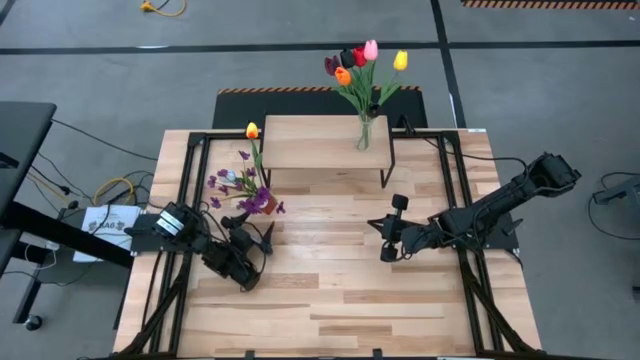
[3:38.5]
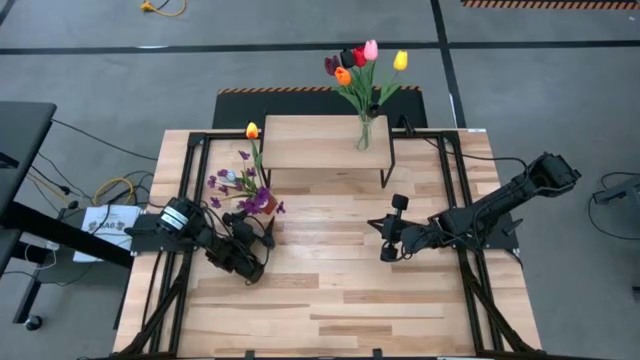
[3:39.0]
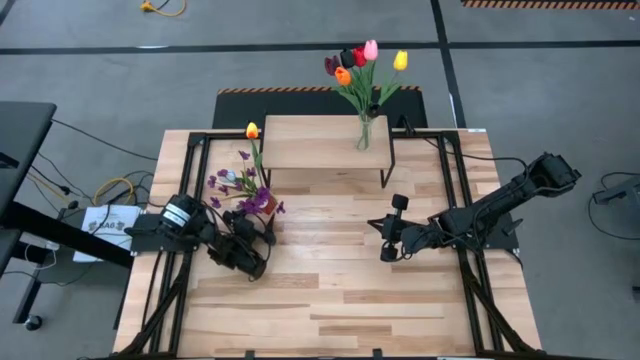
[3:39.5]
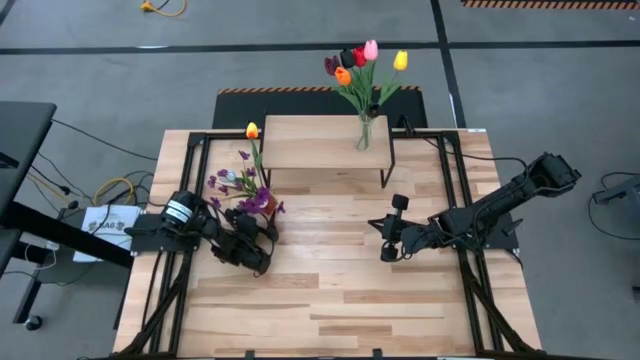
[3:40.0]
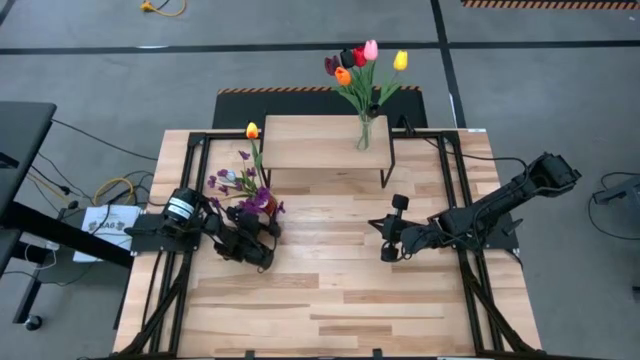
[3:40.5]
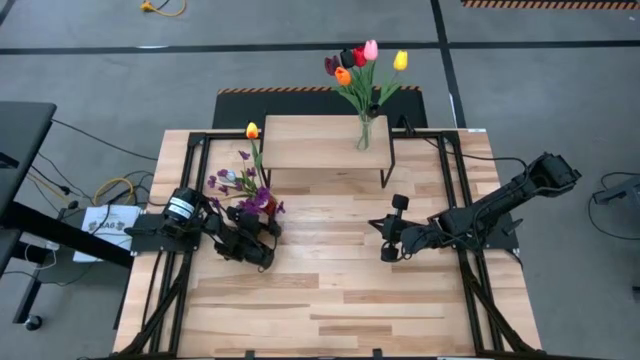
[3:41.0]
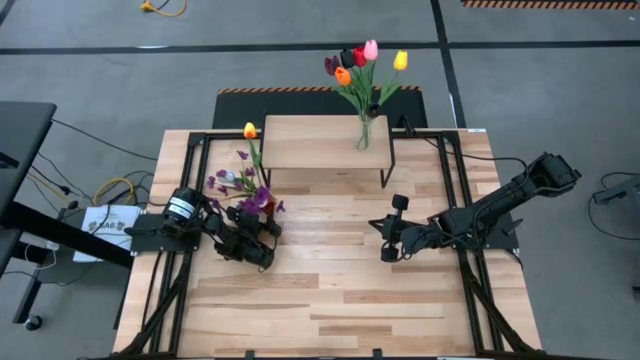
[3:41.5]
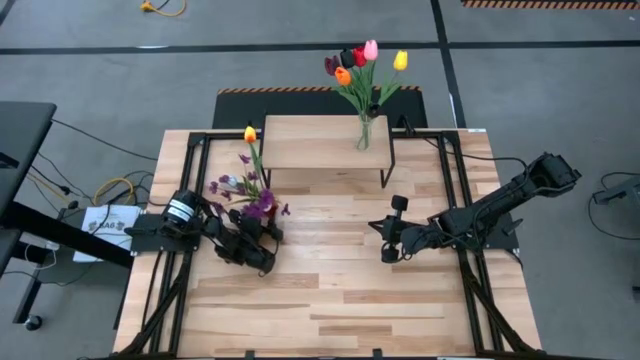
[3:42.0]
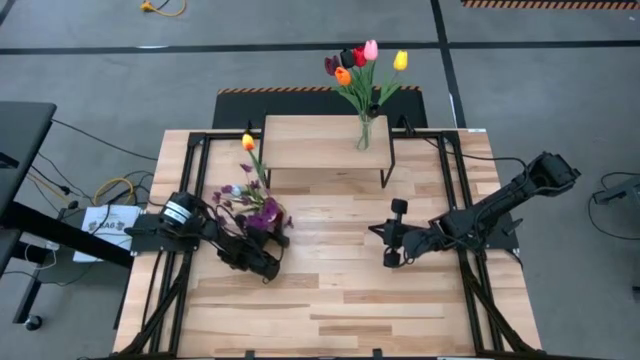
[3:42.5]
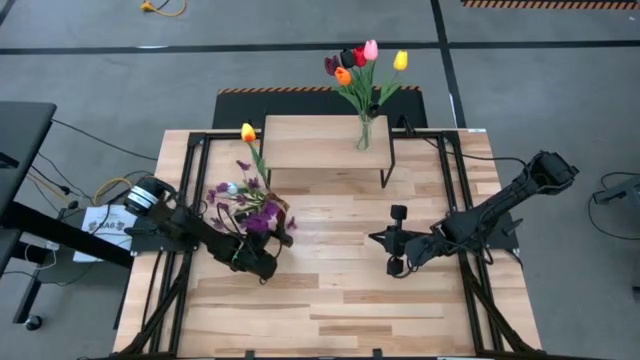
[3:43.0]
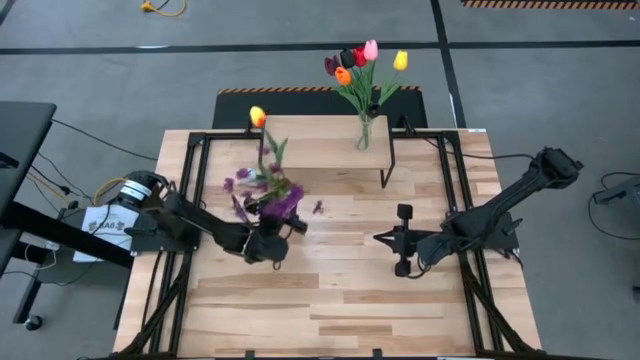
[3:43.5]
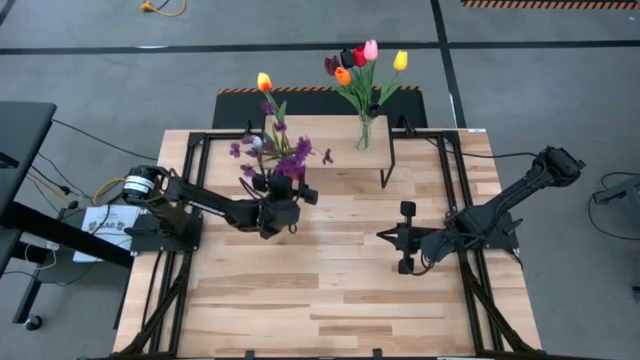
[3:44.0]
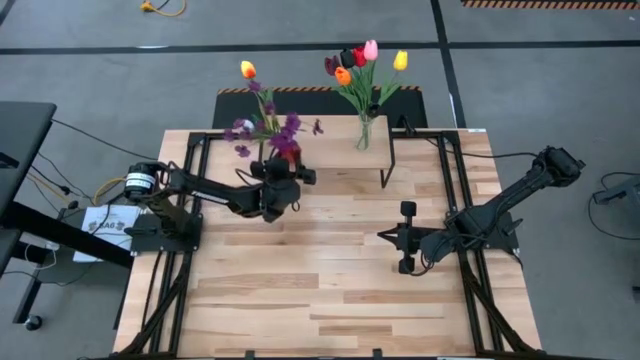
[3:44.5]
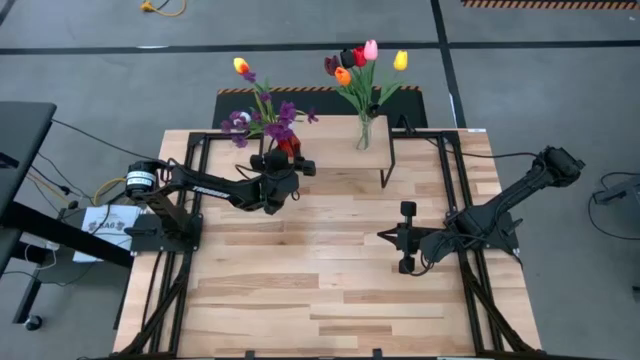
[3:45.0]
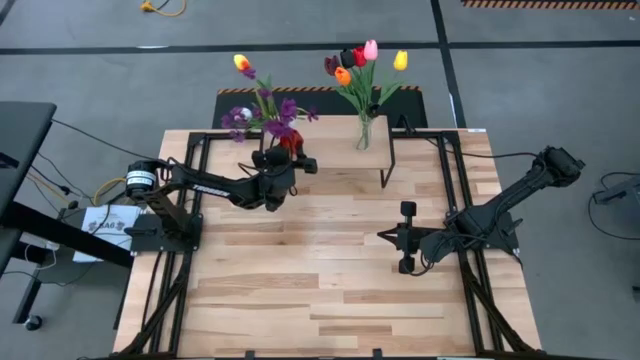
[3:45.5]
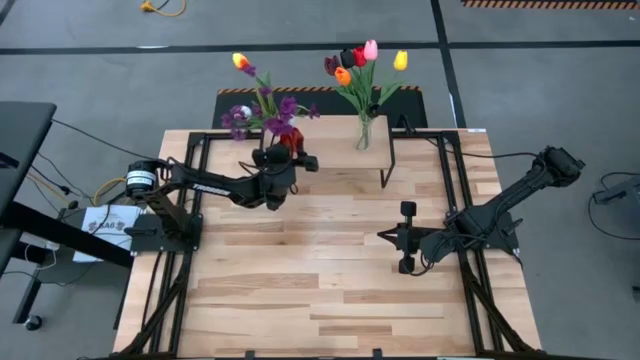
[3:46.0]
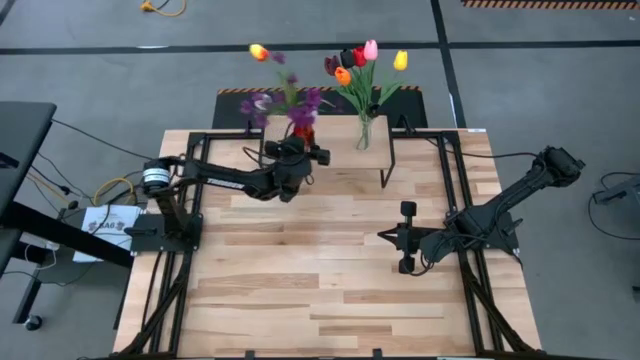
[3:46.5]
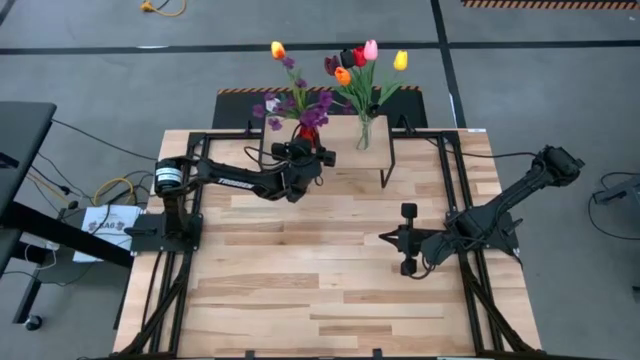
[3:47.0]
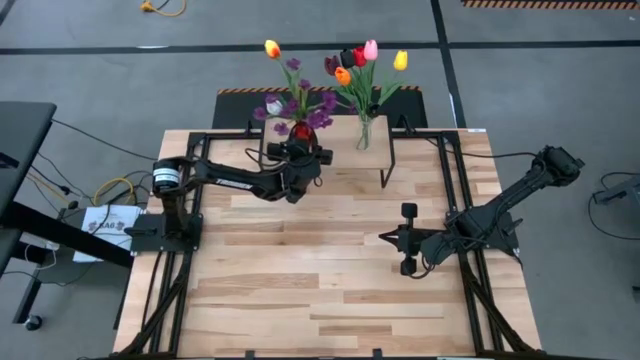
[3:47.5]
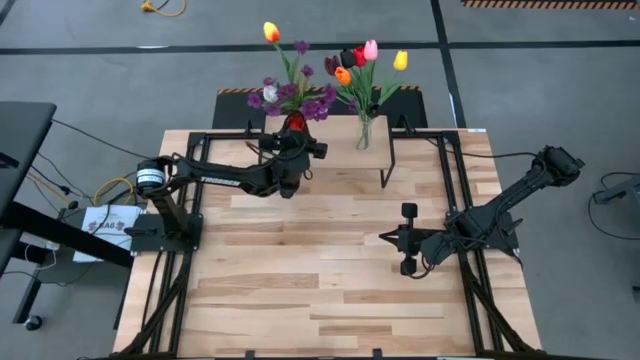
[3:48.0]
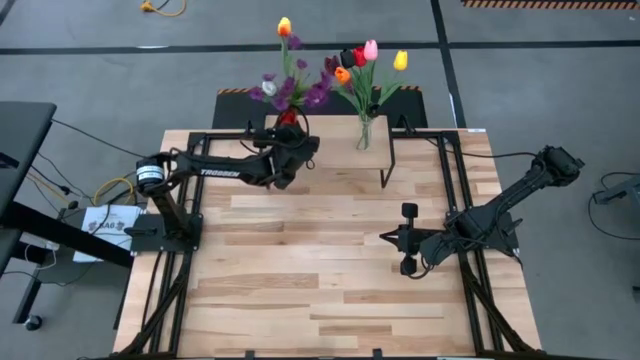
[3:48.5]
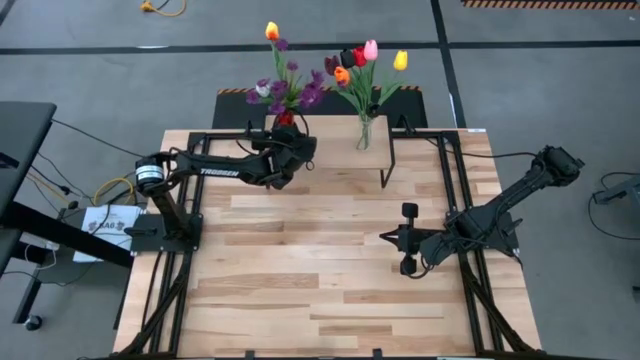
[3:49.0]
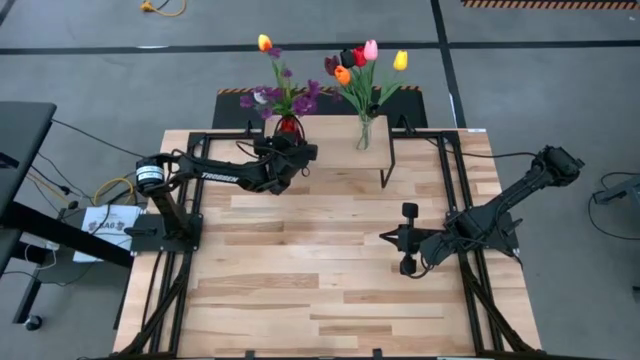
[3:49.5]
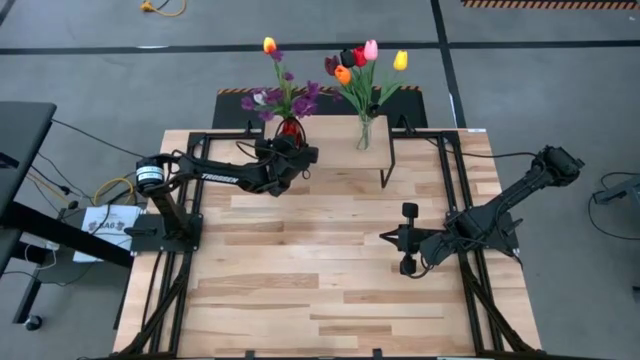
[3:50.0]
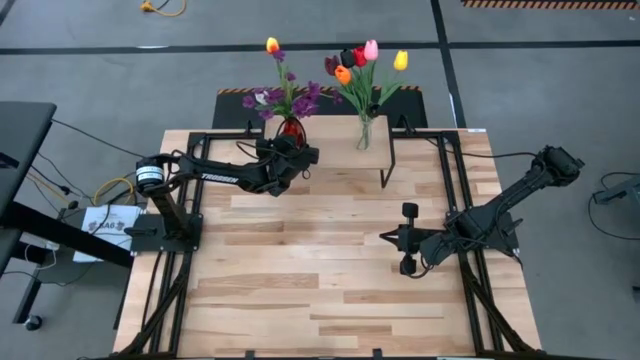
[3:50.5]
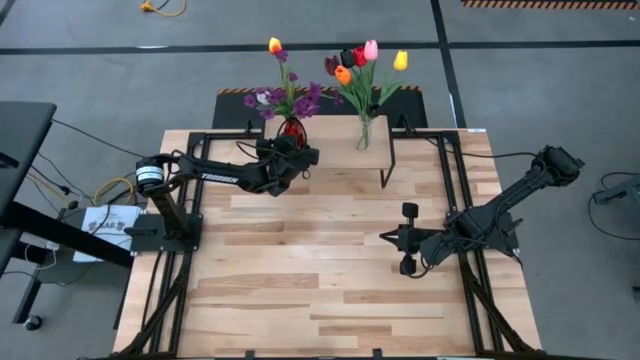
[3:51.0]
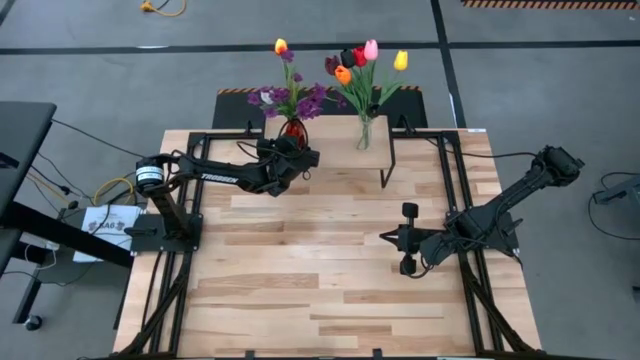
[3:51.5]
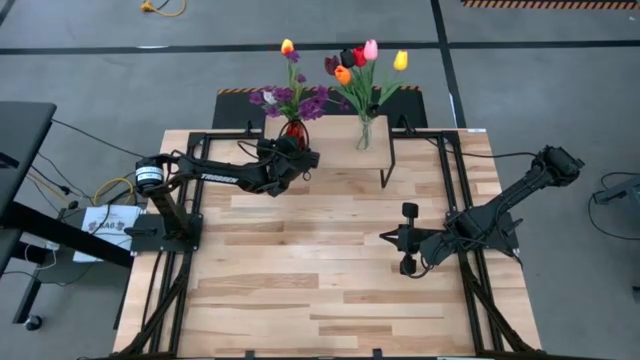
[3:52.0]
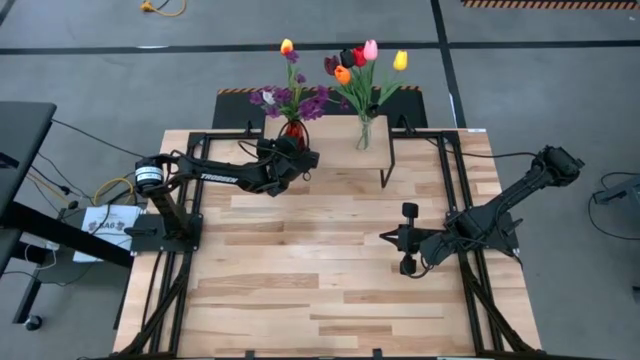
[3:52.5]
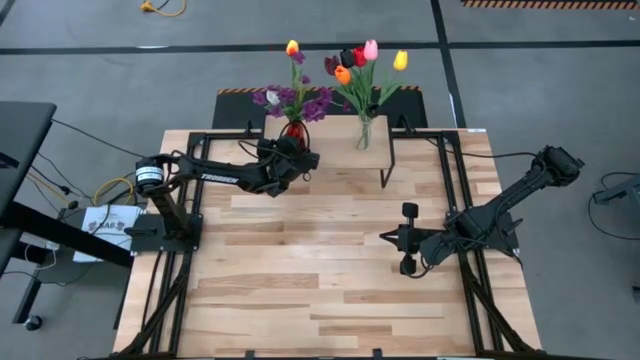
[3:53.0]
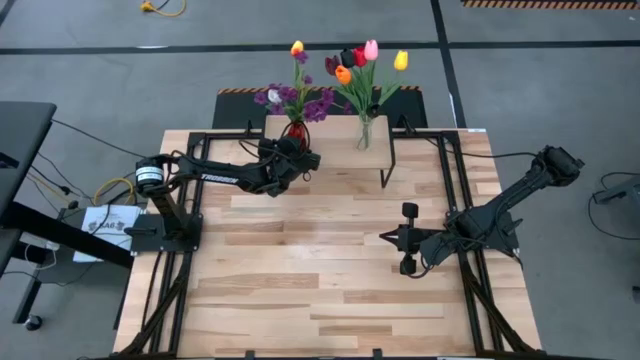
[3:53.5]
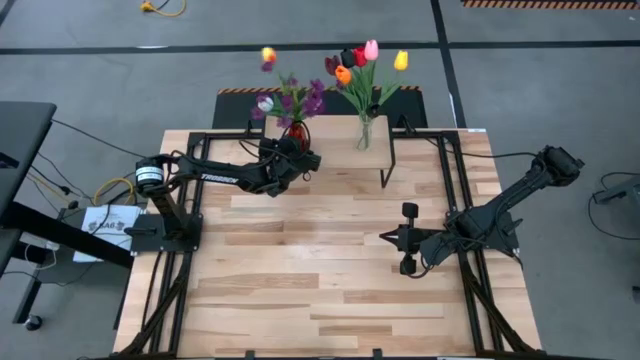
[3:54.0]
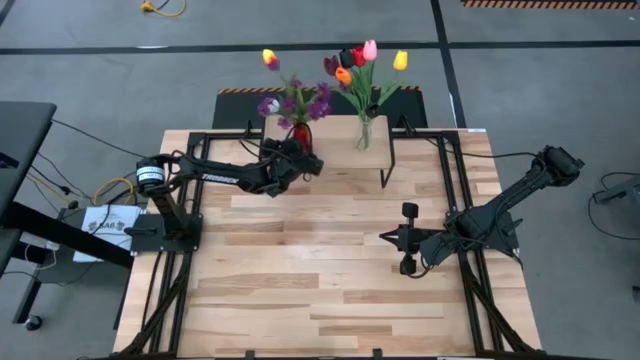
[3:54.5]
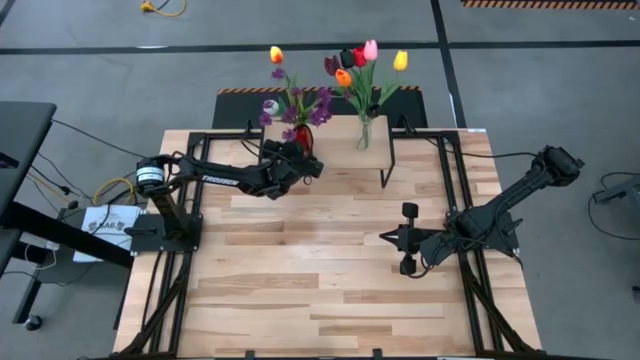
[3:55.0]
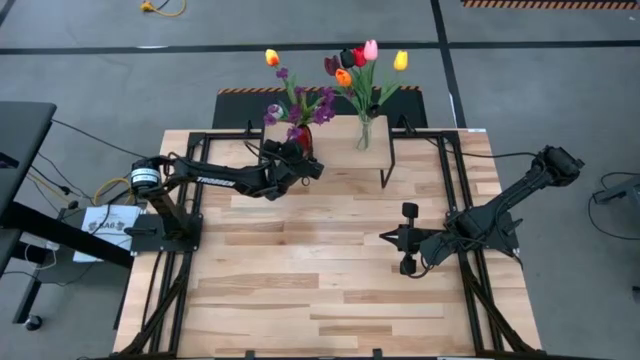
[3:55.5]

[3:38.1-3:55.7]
Task: Pick and place flowers into a vace then onto a shelf
Put the red vase filled with flowers on the shelf

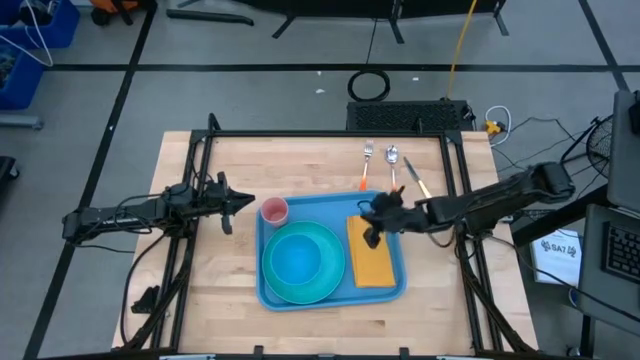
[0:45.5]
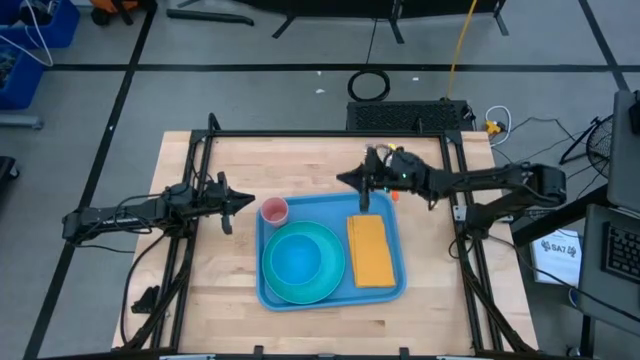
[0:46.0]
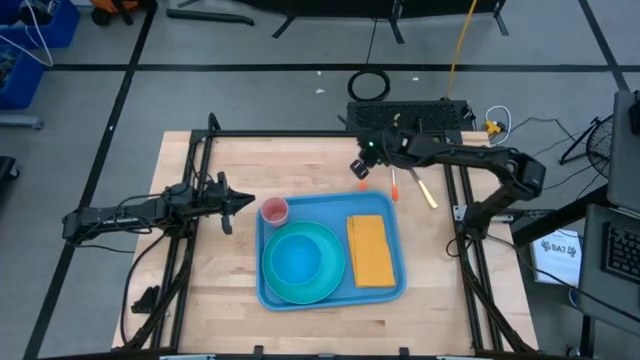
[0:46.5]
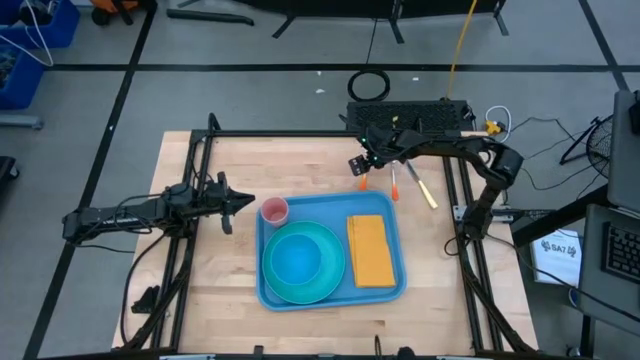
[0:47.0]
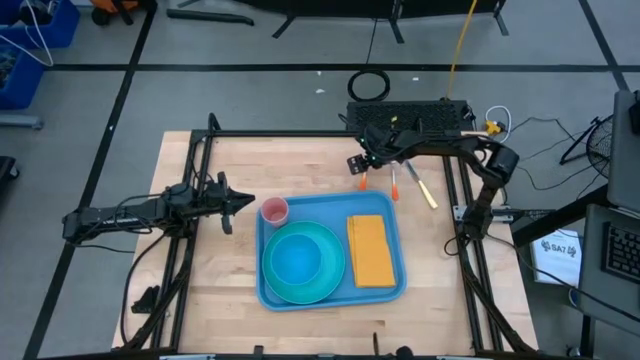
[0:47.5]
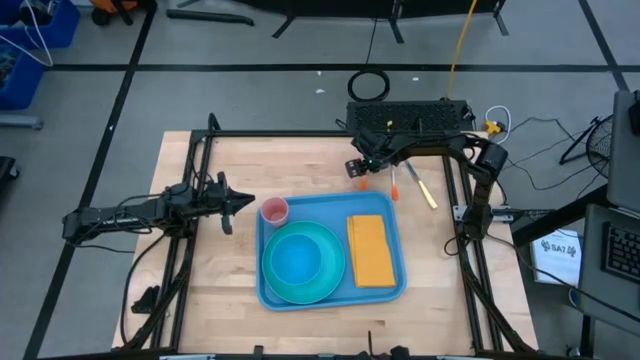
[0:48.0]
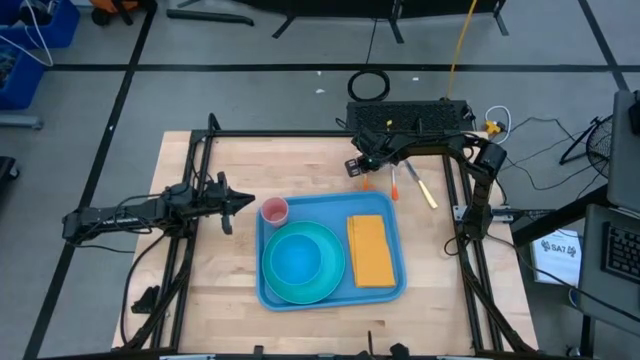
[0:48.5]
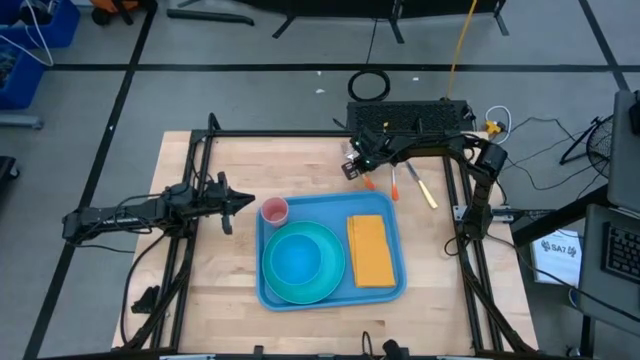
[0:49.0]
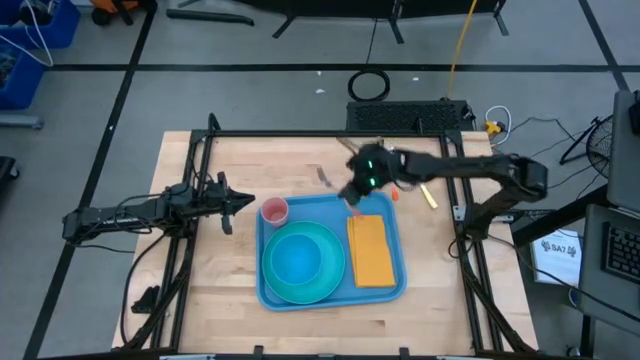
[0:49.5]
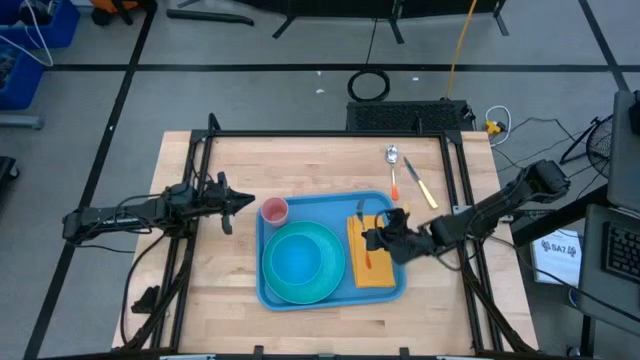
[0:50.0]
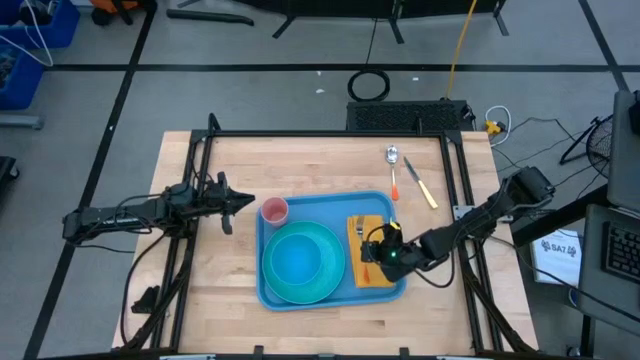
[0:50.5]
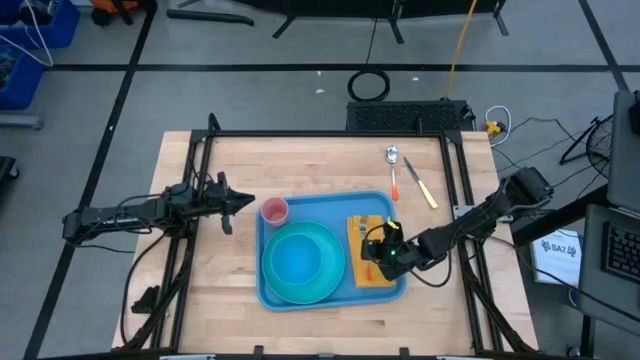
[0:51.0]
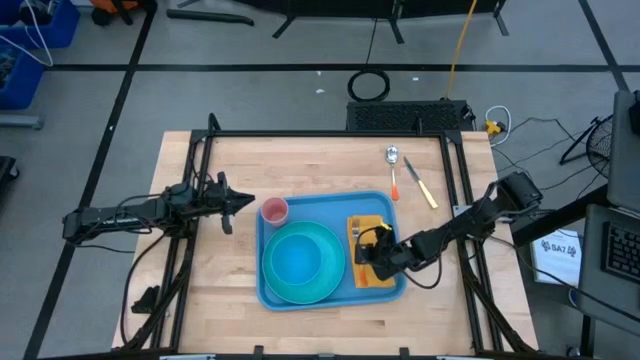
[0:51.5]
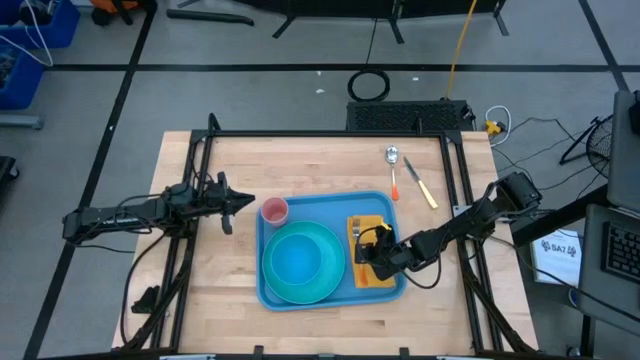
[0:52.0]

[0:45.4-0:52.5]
Task: Set up tray
Put the orange fork on the yellow napkin
